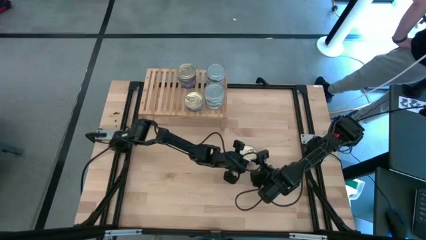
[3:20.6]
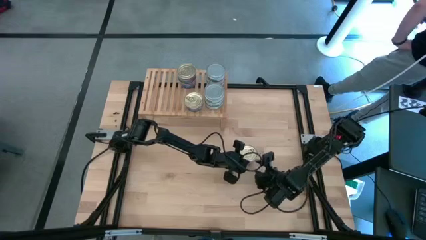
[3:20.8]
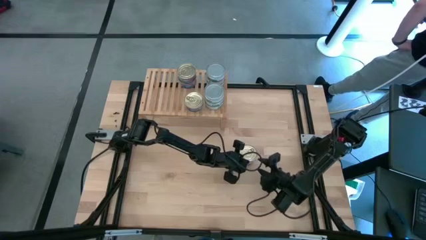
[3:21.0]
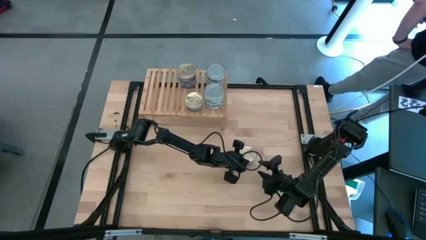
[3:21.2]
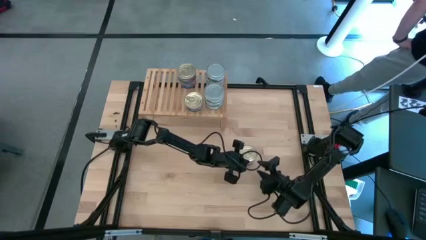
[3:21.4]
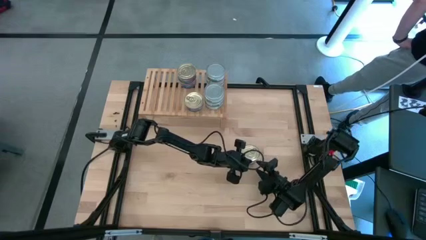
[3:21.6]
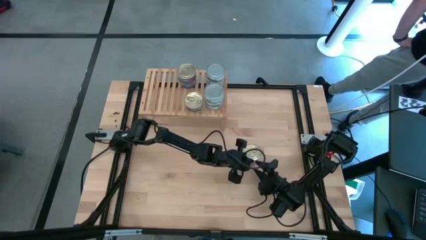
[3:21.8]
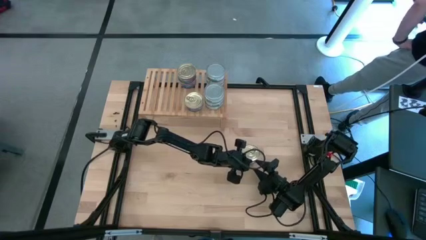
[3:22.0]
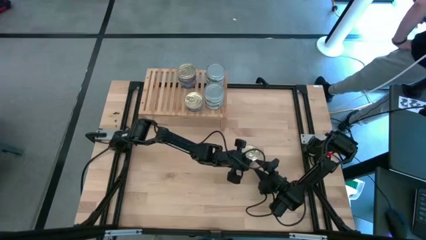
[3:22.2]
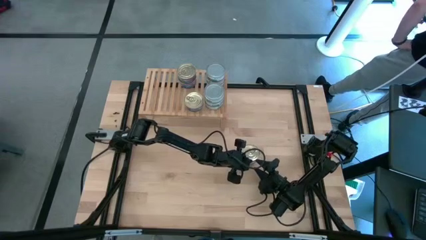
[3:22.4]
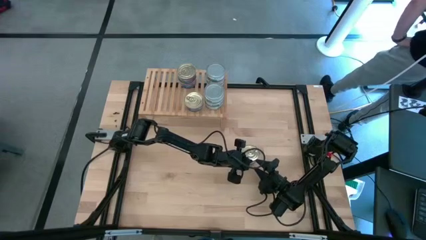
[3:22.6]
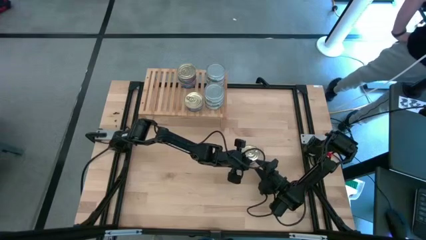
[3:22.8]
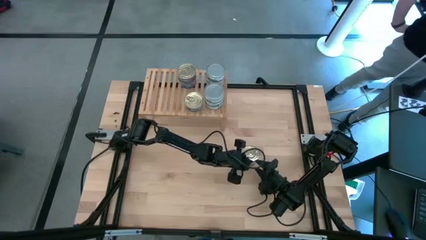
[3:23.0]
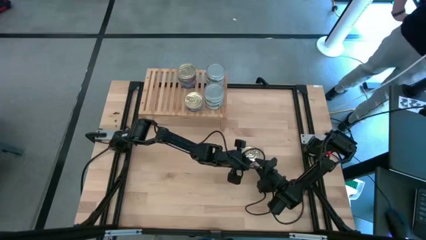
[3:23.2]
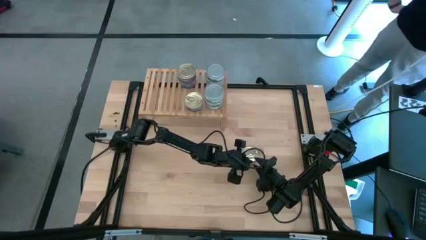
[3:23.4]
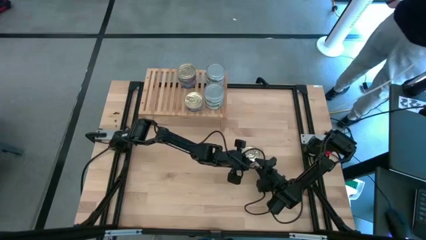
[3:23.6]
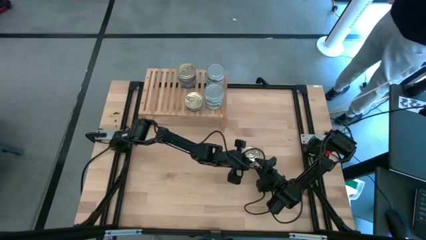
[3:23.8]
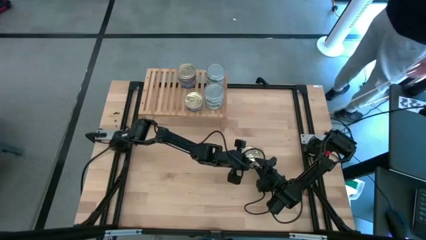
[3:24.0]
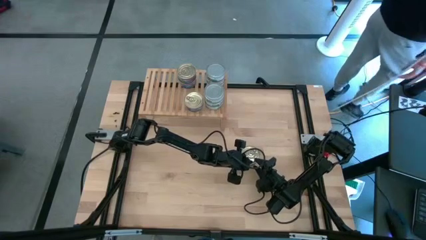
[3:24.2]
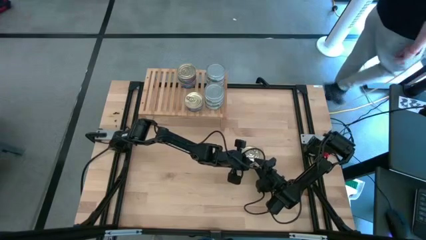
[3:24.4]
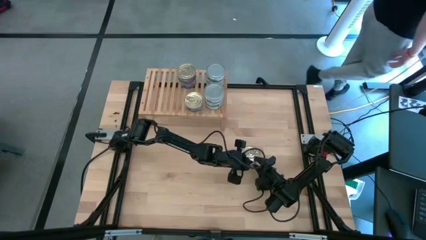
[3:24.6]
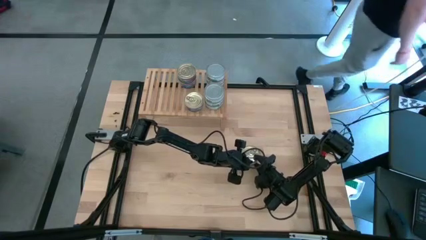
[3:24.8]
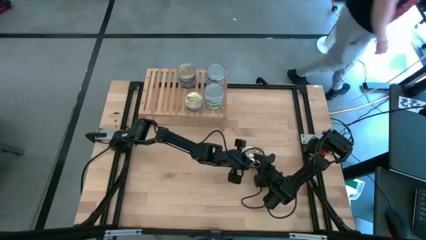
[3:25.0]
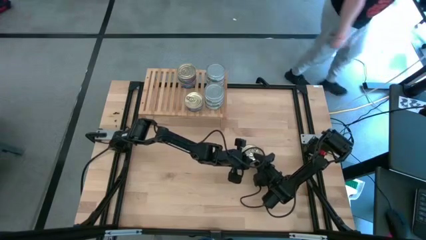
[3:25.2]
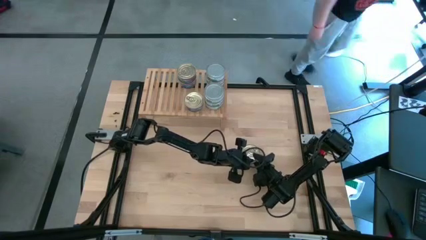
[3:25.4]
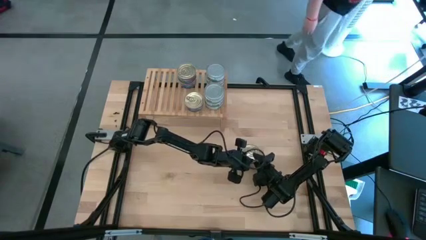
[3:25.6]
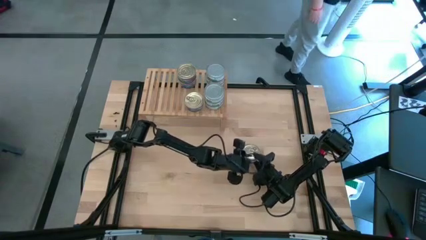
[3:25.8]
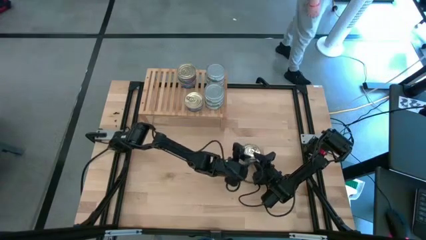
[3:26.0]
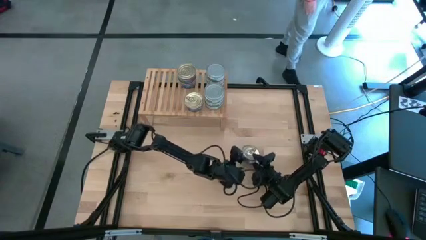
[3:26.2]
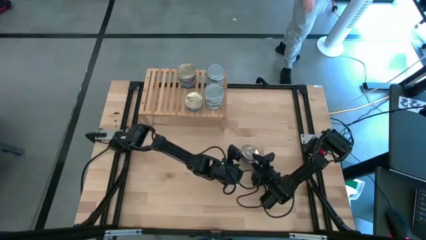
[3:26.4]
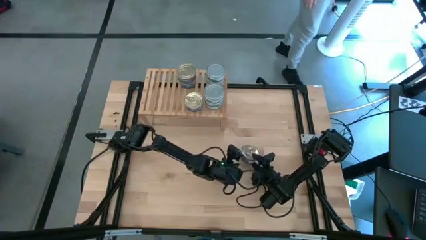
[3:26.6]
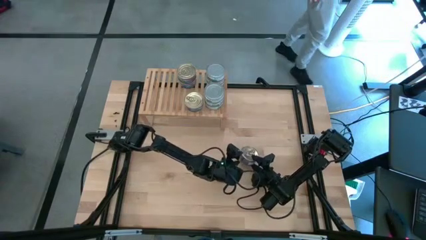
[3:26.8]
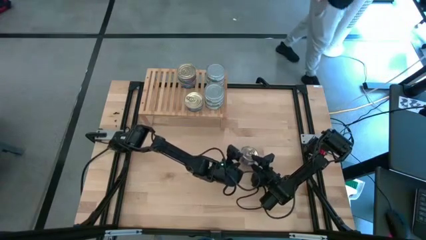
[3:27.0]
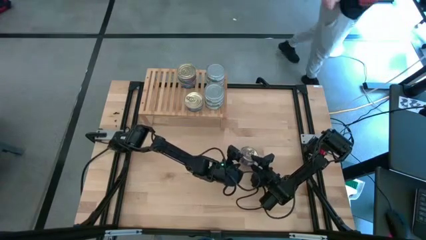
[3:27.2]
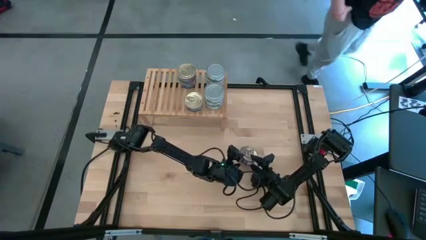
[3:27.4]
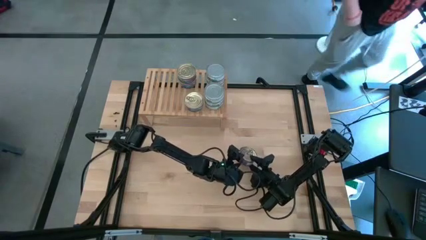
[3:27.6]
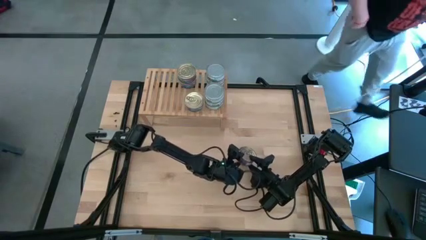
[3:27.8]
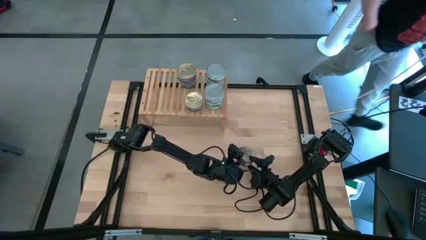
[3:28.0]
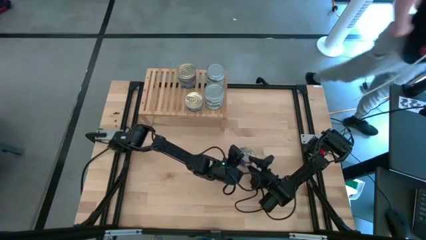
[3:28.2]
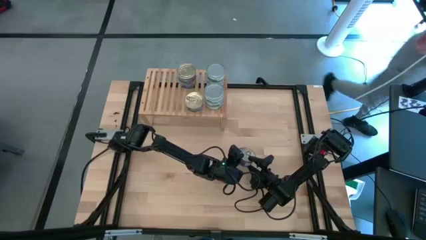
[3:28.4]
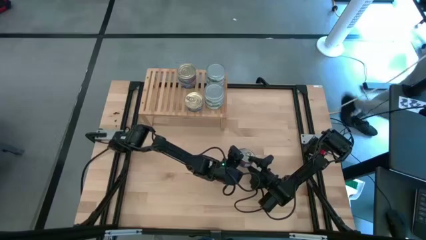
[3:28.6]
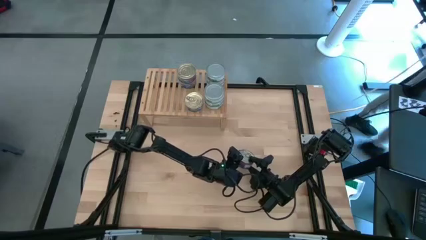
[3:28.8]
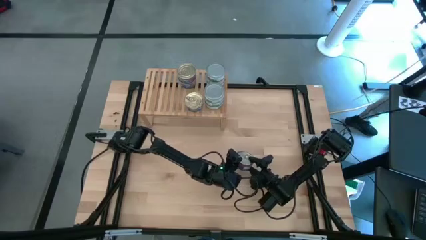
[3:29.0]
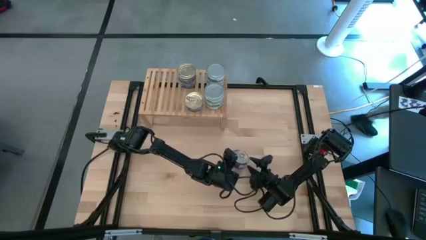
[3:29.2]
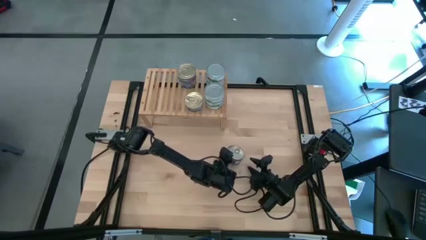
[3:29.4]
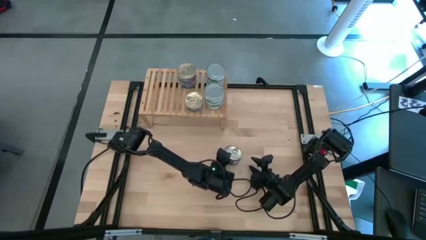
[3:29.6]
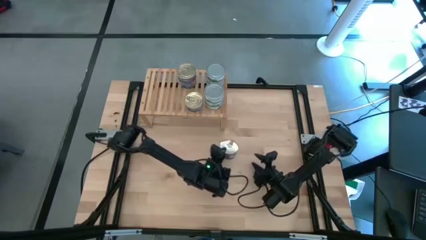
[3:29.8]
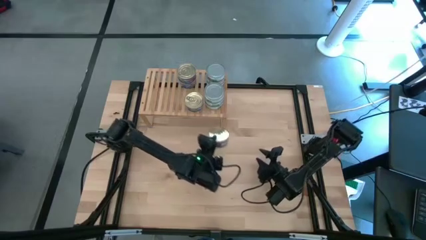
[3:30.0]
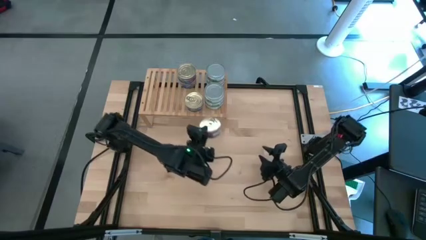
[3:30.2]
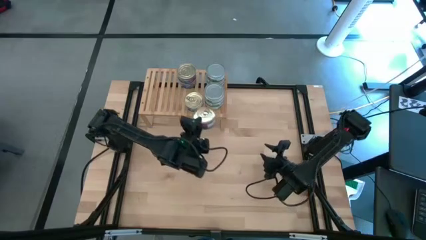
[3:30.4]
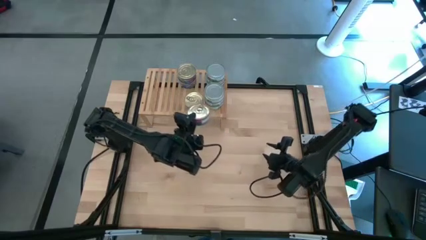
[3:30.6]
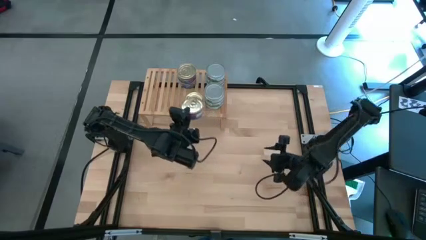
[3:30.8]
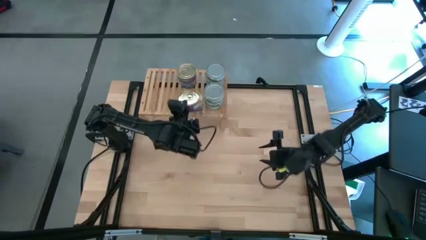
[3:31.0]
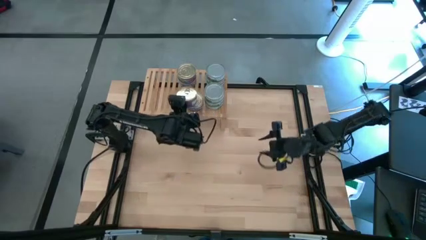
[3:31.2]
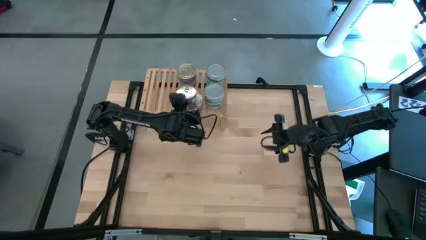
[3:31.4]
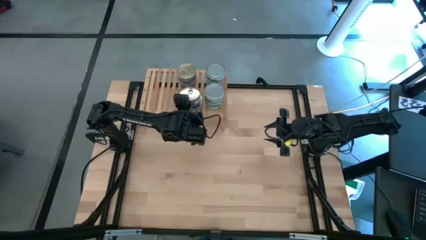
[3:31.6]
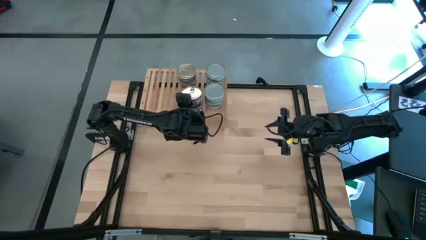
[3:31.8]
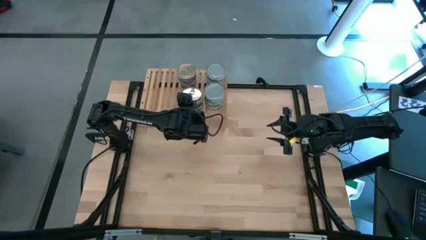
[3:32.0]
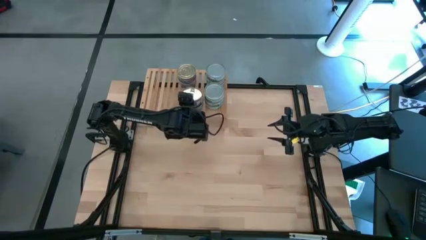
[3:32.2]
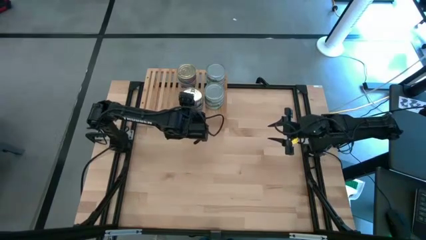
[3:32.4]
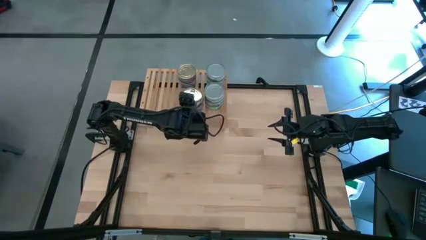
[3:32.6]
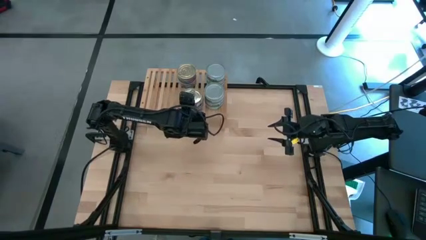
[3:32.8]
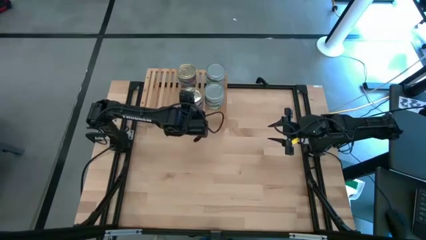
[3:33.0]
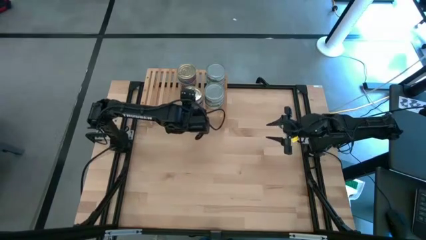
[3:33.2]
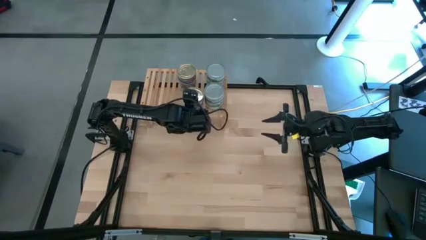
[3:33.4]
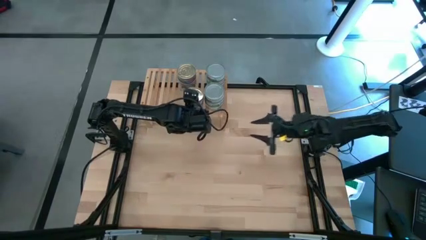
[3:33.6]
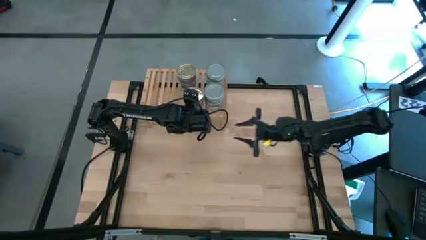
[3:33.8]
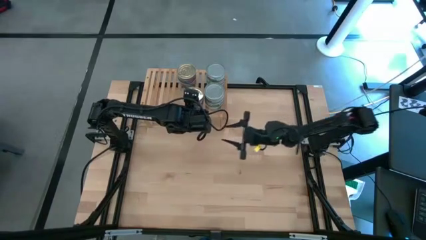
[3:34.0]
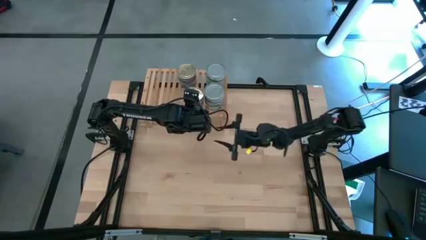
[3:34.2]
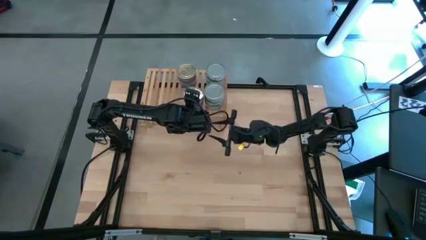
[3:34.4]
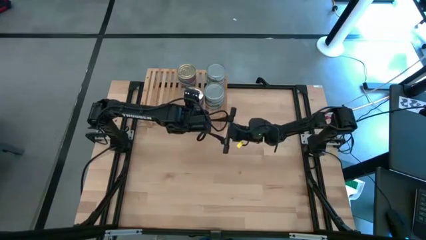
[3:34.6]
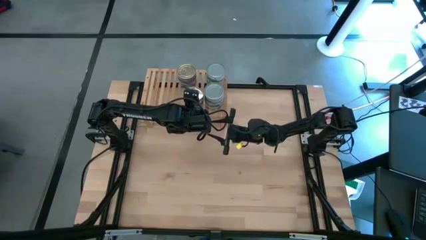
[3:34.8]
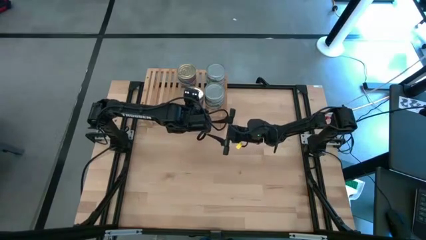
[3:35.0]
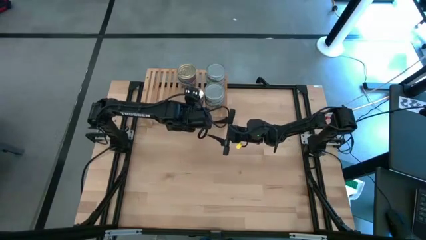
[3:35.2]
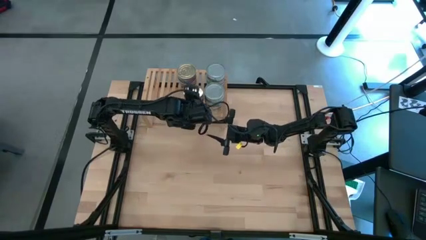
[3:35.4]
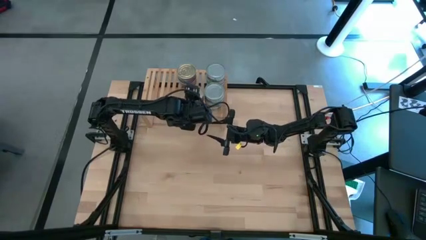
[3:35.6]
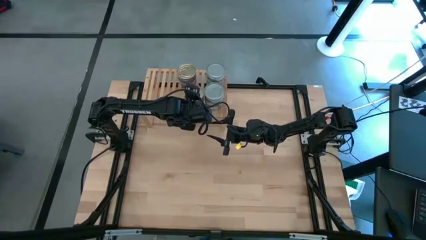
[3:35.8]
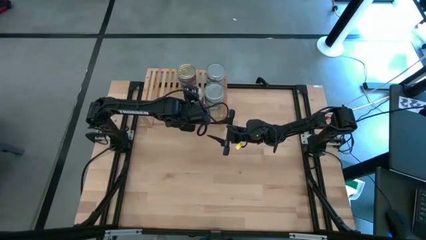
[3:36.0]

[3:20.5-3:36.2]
Task: Stack canned seafood by type on shelf
Stack the blue tuna can on top of the bottom blue tuna can on the shelf

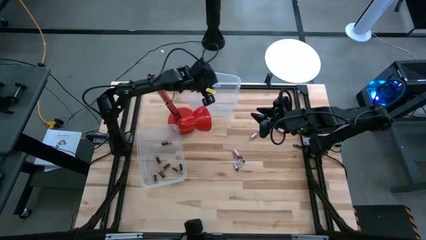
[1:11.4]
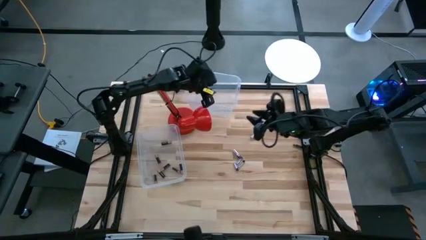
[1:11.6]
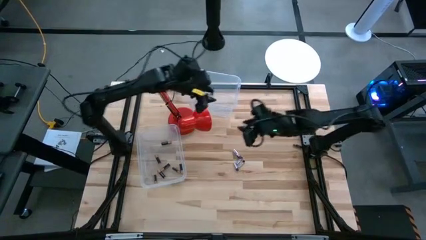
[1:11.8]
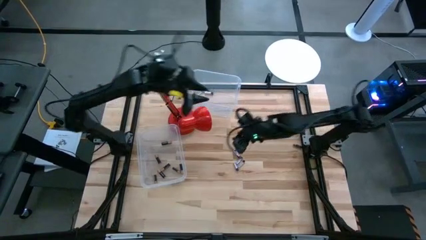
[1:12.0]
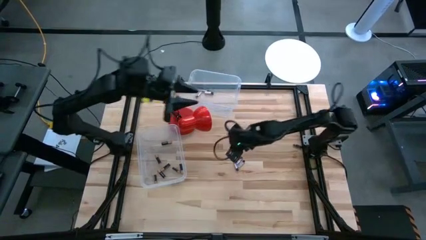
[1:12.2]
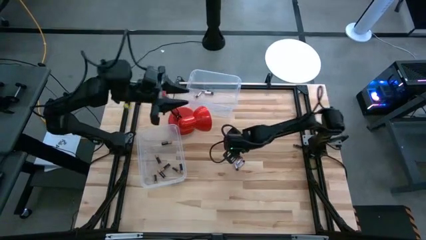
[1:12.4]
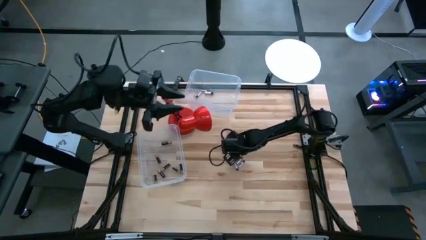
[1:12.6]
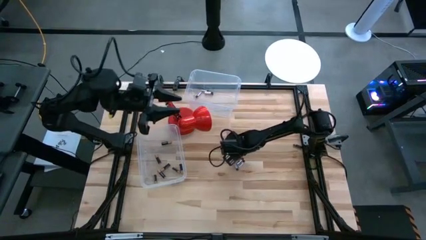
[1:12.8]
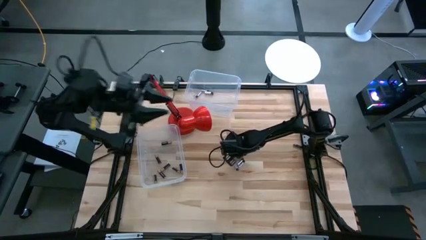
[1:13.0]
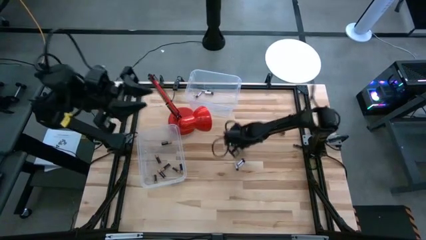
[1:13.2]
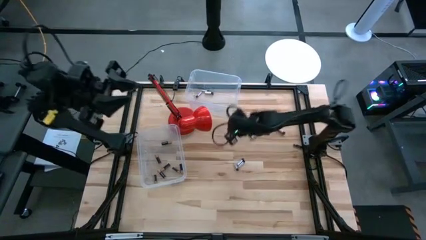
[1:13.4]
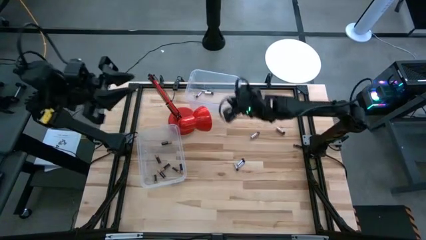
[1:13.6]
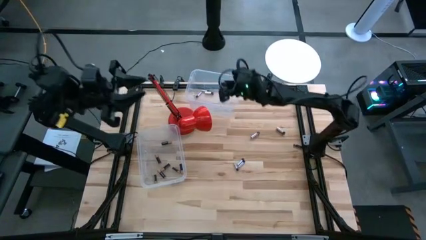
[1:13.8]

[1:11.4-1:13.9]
Task: Sort batteries
Put the white battery into the top transparent bin
